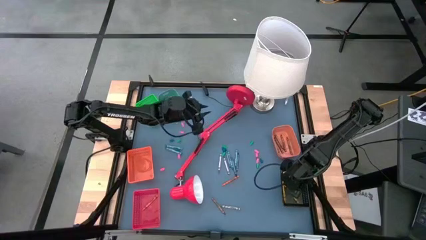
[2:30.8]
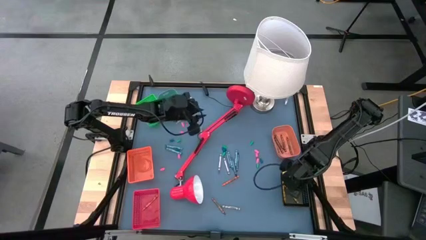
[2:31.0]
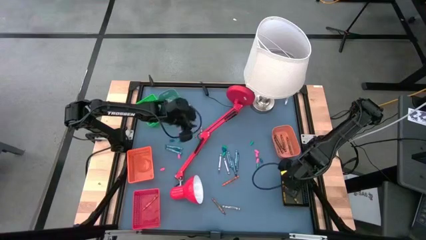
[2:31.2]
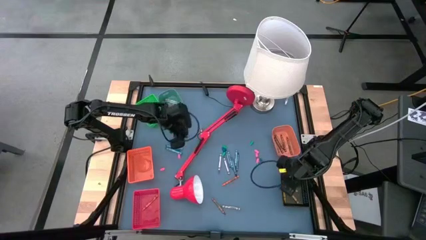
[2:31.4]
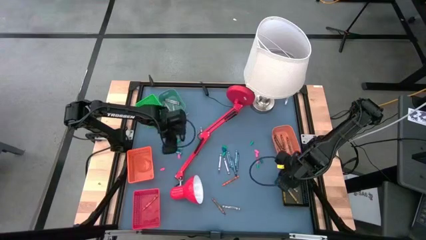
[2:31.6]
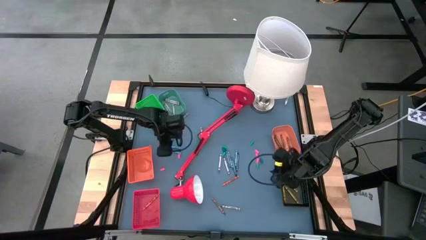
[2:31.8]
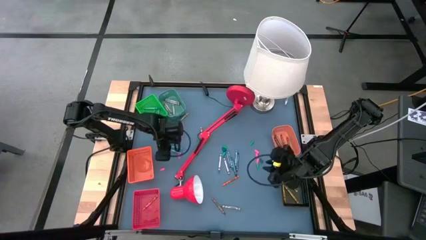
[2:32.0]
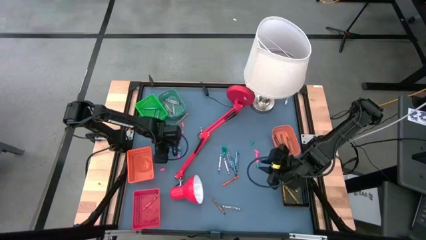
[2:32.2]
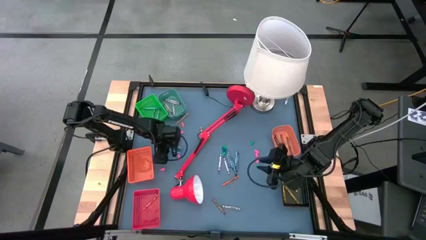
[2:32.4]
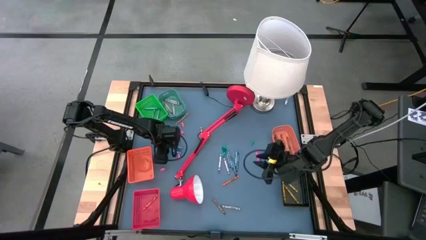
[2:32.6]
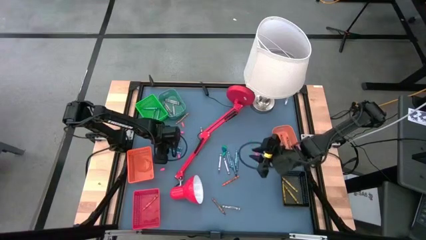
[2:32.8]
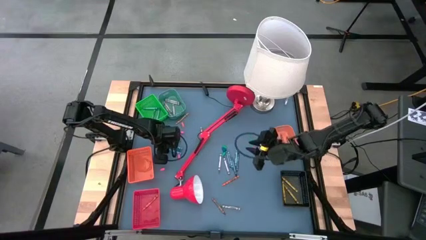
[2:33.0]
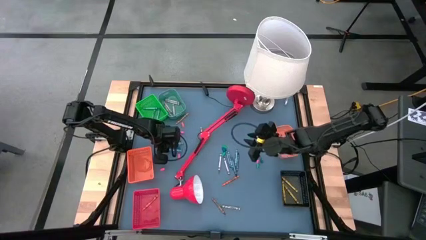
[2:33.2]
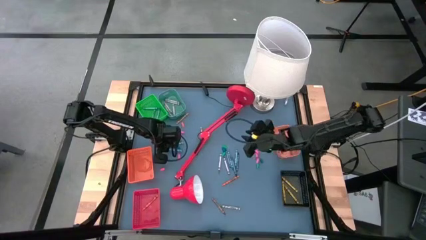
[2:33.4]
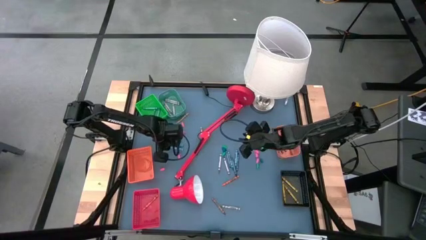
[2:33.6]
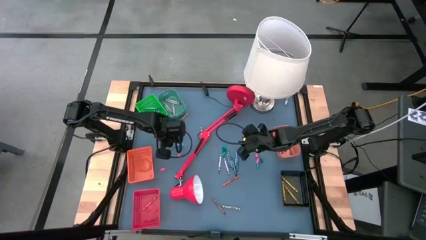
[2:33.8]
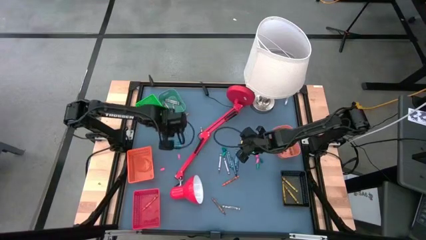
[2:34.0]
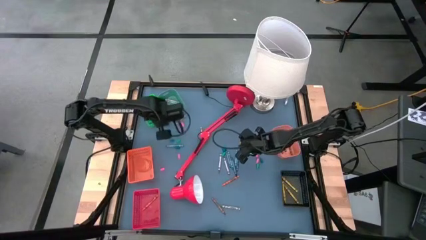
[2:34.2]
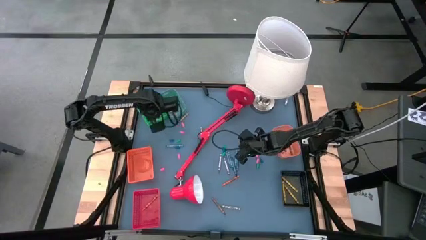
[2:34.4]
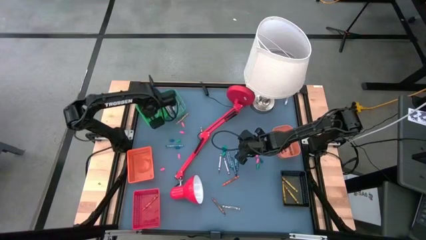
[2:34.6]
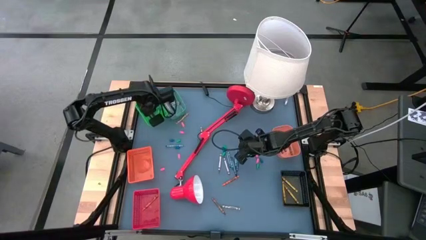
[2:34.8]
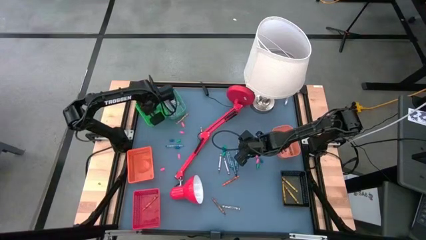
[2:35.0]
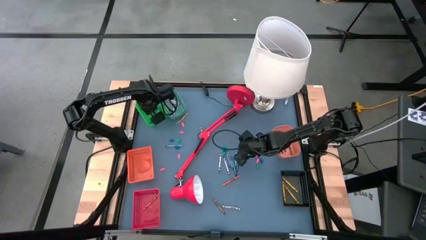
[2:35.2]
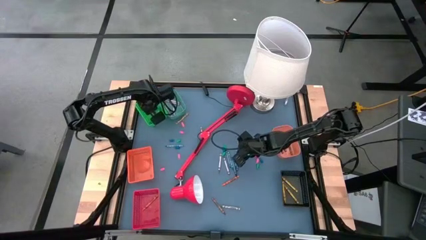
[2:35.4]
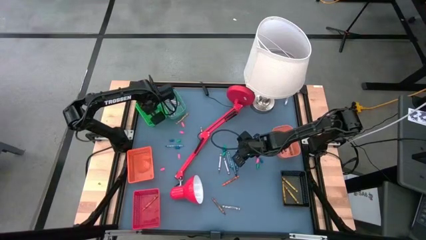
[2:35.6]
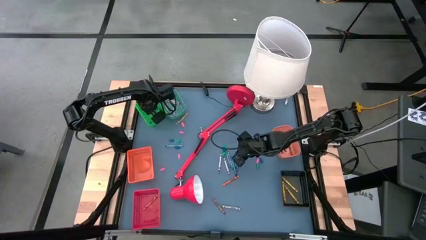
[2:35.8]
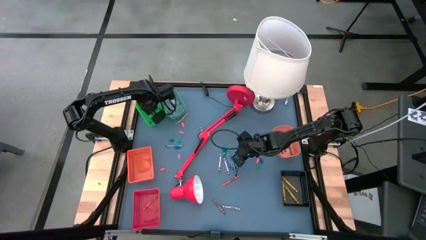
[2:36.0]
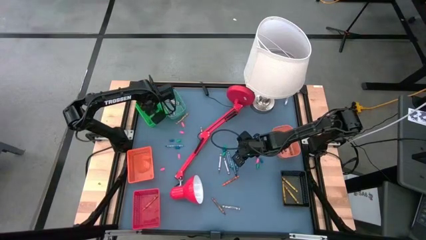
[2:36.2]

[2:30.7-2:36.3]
Task: Sort crayons
Put the green crayon into the green bin

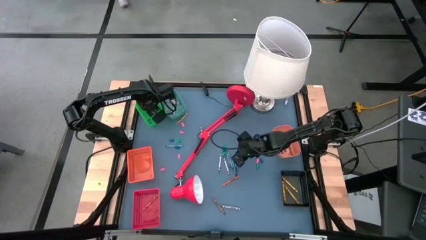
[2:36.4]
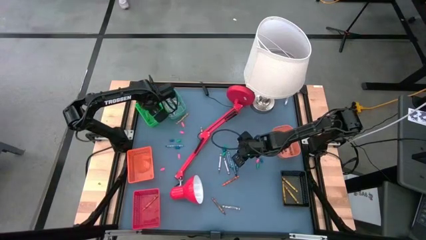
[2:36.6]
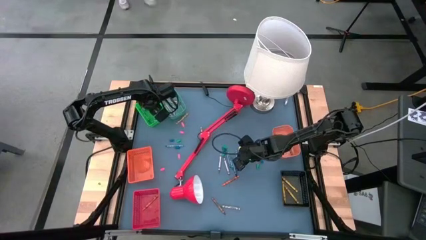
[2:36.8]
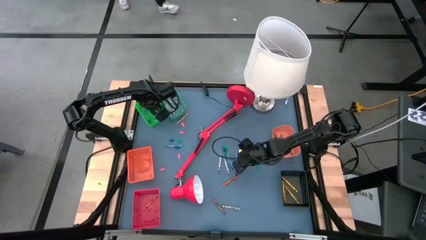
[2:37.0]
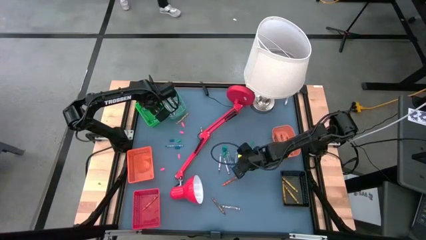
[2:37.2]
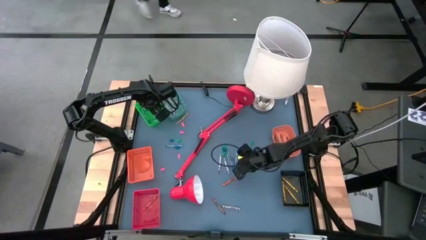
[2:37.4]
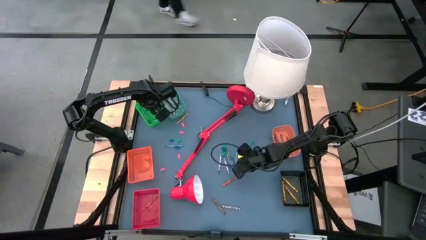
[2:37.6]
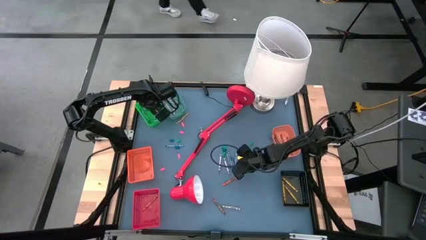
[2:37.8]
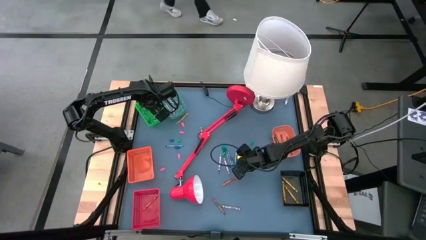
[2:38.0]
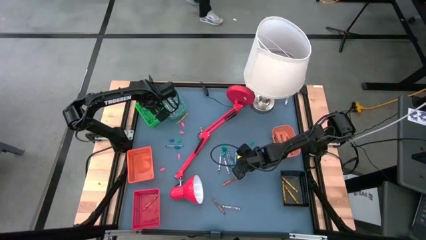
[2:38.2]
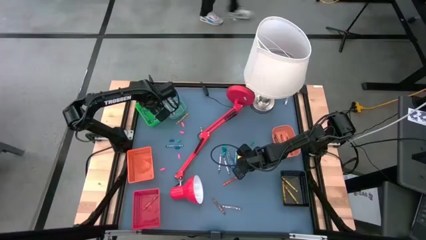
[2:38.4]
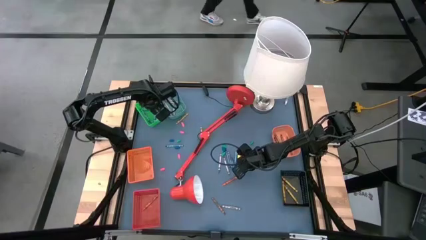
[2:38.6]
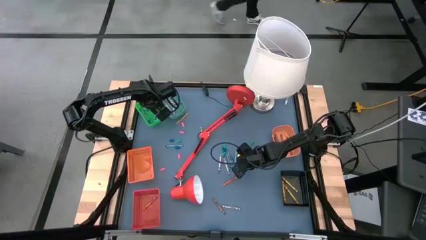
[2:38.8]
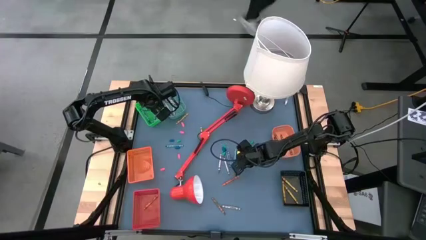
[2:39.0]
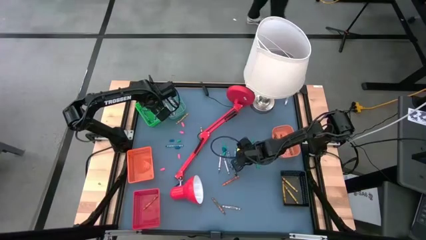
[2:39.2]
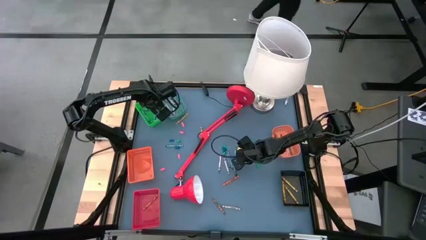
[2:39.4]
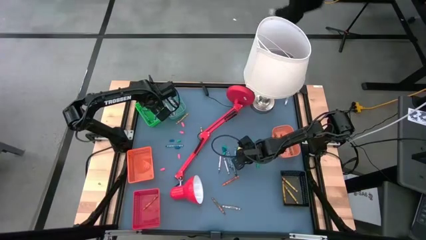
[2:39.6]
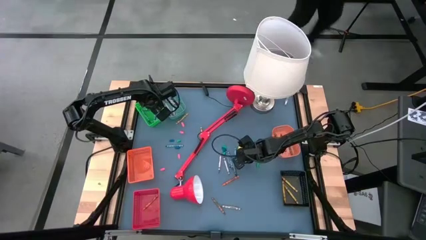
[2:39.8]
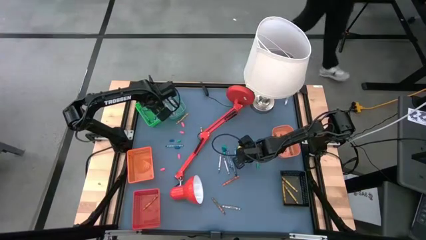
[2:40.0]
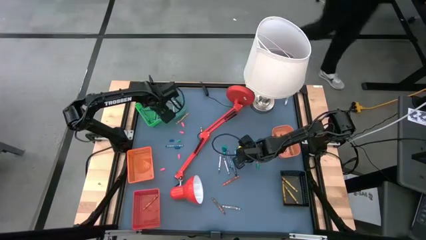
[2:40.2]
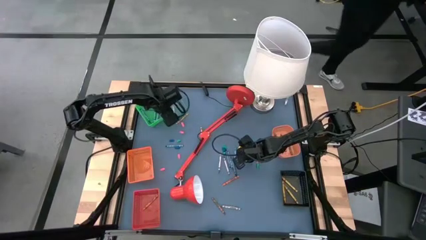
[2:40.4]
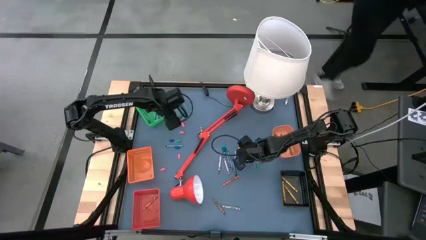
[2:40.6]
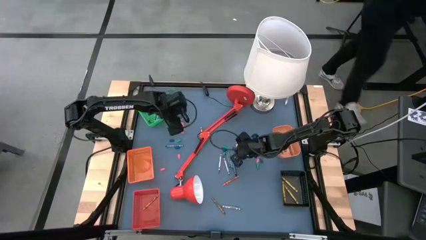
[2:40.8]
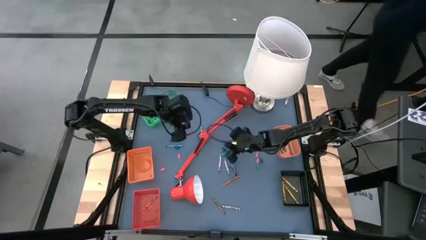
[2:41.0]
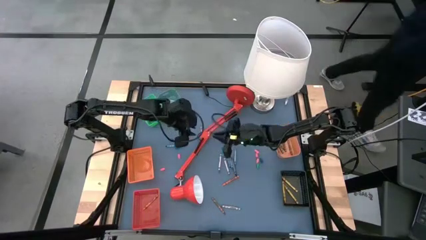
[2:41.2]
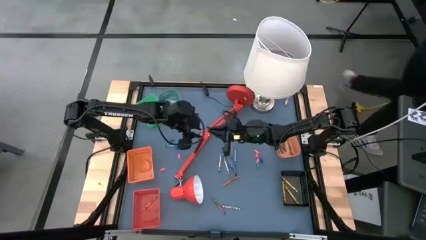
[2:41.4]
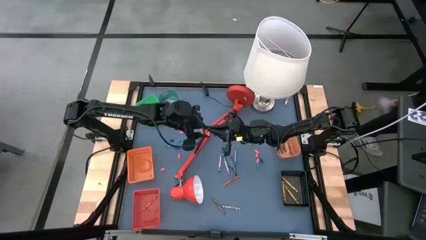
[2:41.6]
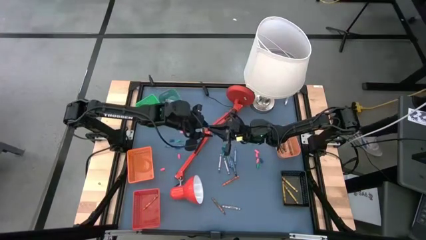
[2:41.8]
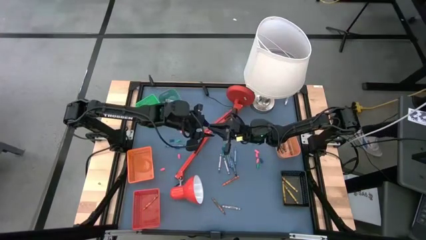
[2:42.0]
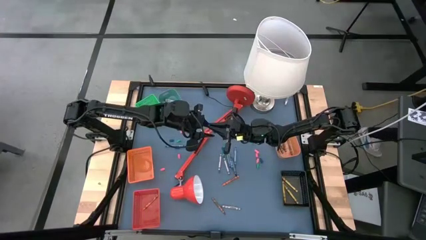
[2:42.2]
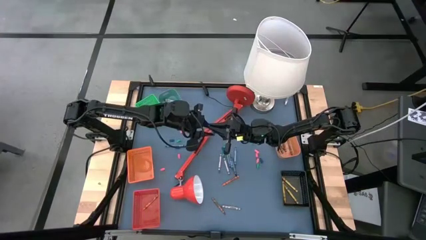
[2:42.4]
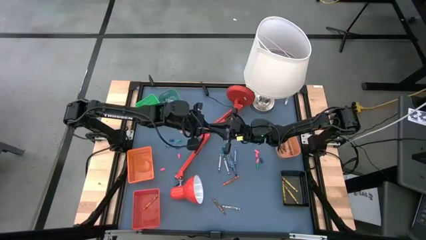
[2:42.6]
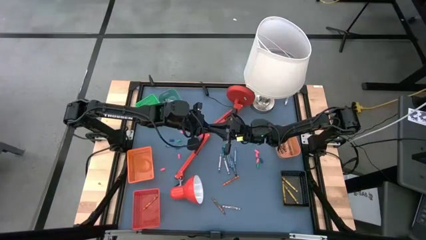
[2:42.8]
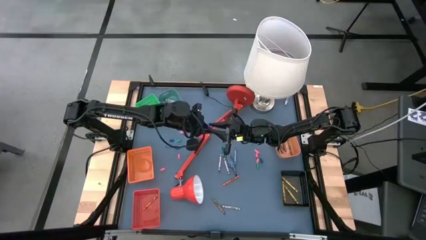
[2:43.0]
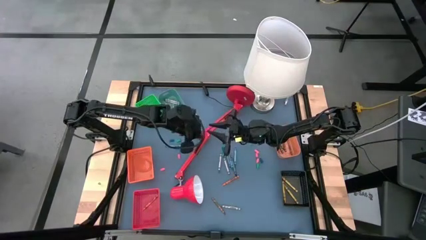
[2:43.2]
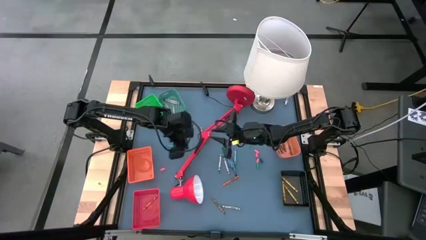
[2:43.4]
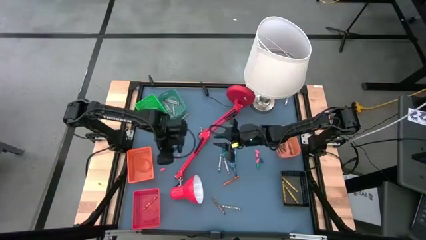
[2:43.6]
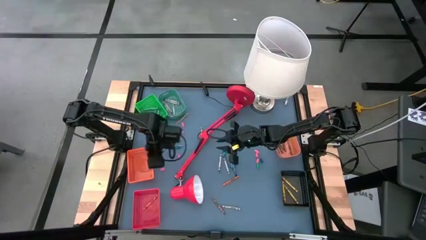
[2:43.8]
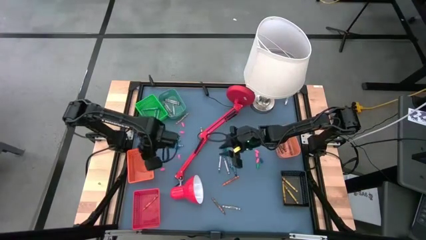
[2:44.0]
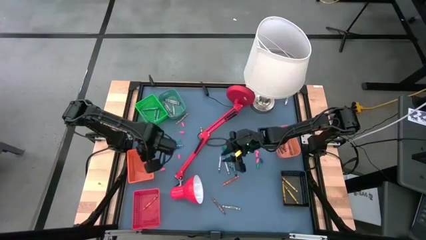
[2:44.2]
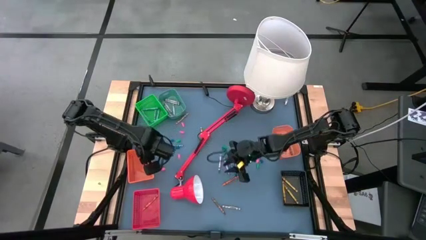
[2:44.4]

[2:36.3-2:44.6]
Put the right dark blue crayon into the left orange bin

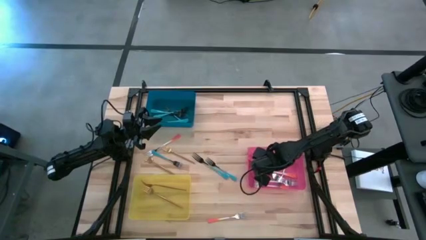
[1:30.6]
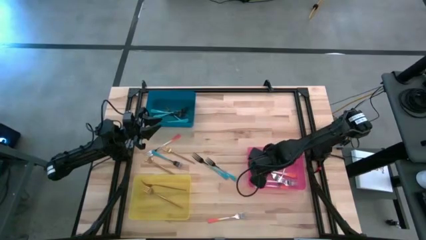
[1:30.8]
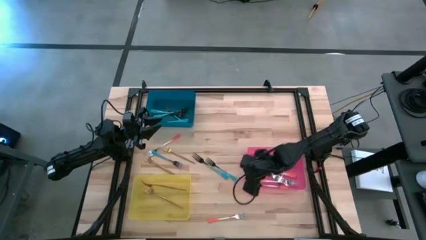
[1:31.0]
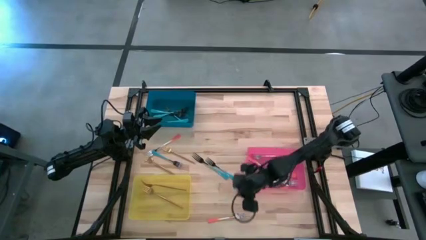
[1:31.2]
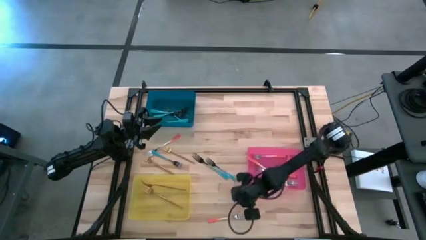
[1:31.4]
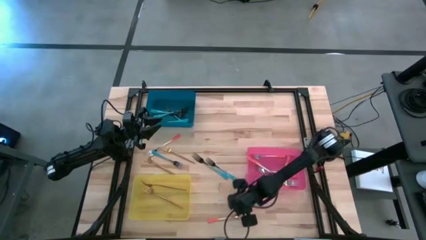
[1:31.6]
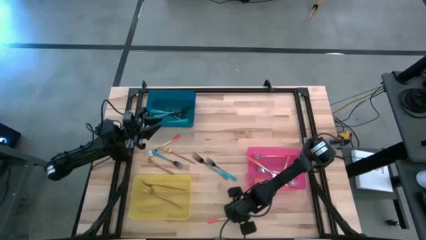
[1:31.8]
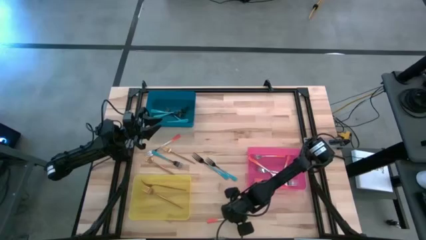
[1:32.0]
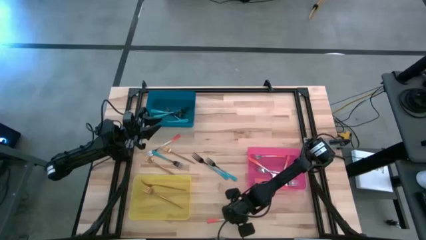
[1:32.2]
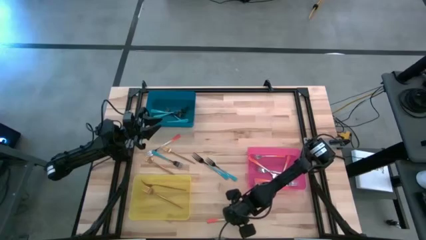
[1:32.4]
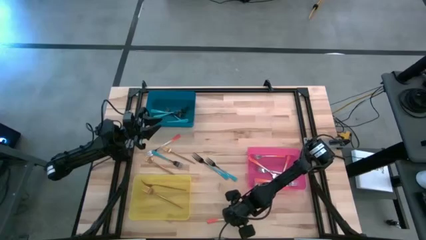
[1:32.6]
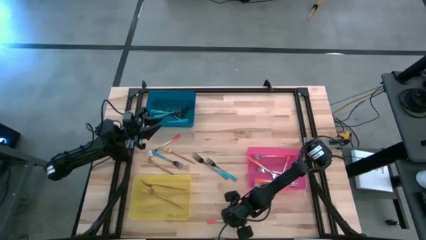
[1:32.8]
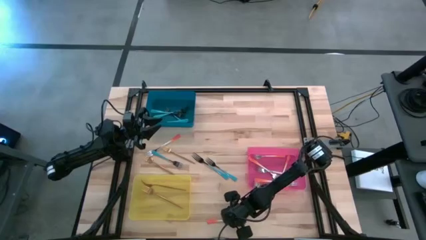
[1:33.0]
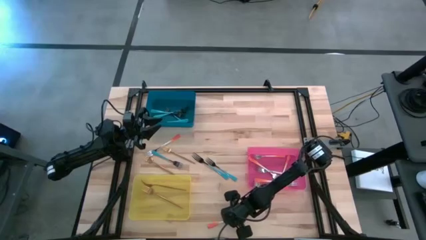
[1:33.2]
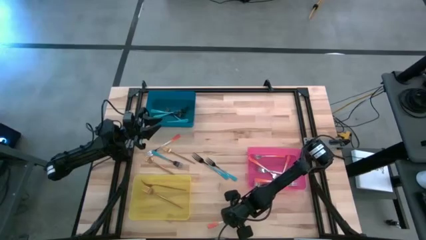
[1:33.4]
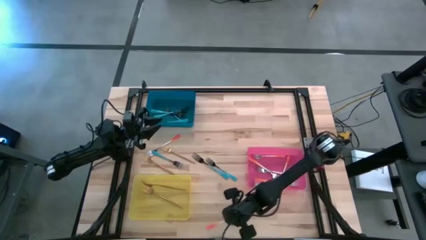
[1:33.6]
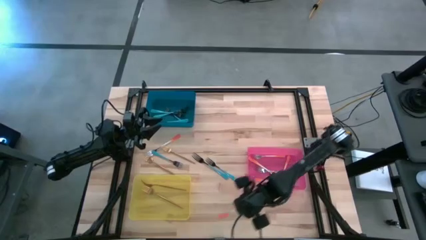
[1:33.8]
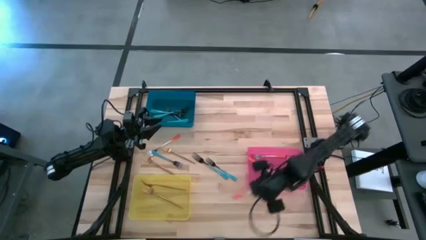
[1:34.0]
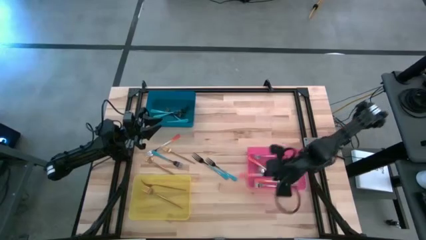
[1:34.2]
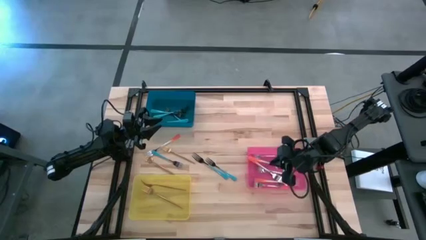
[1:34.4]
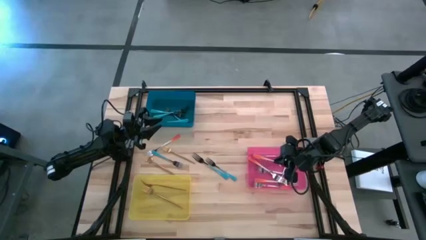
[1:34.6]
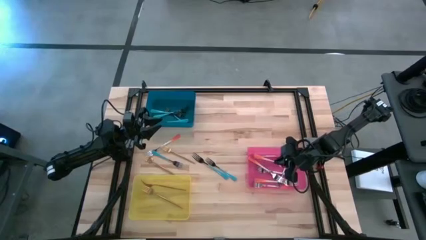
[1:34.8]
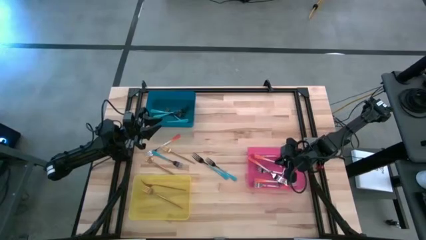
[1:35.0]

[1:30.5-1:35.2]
Task: Sort silverware by color (type)
Put the orange fork into the red bin
